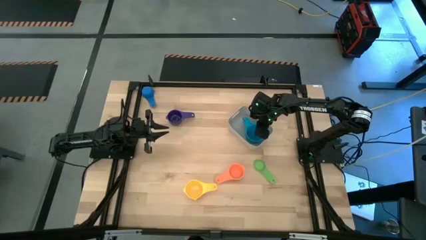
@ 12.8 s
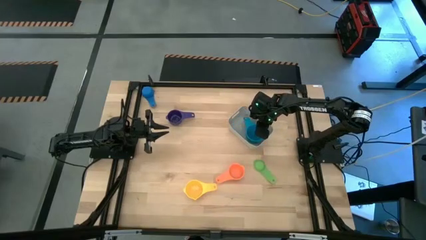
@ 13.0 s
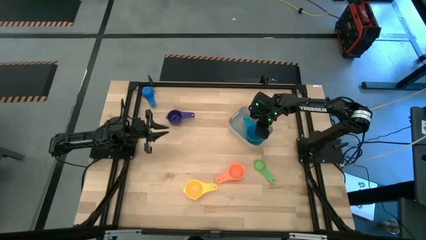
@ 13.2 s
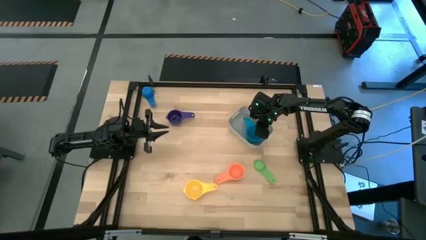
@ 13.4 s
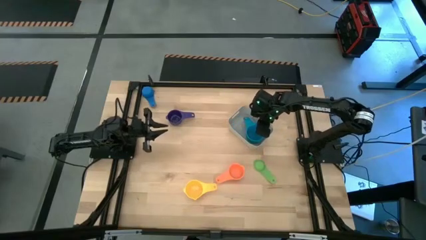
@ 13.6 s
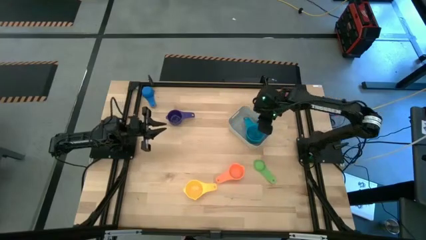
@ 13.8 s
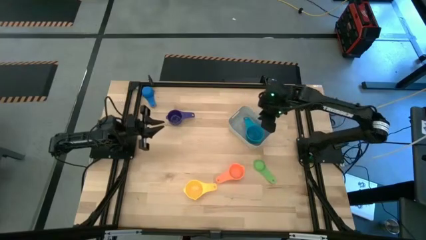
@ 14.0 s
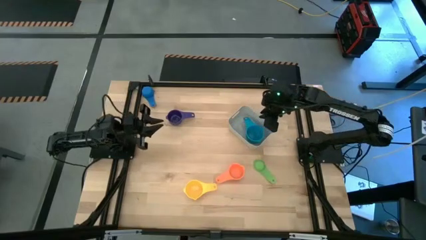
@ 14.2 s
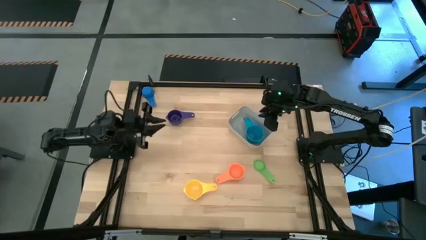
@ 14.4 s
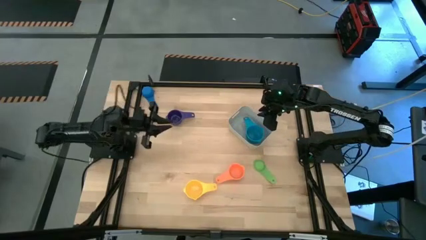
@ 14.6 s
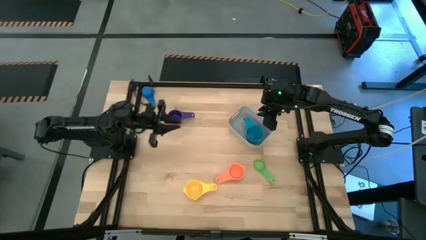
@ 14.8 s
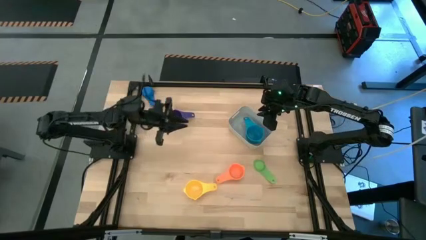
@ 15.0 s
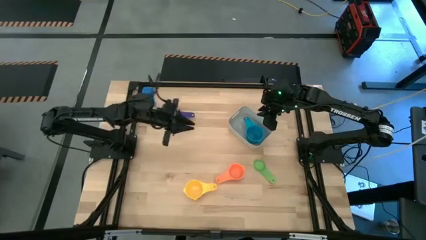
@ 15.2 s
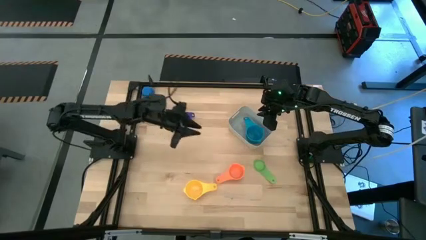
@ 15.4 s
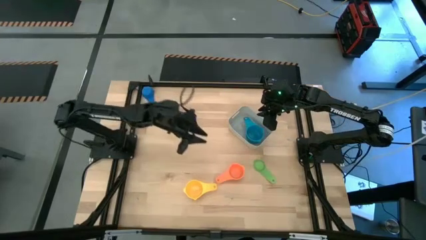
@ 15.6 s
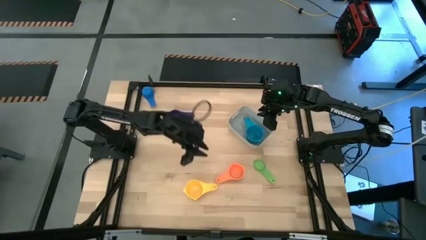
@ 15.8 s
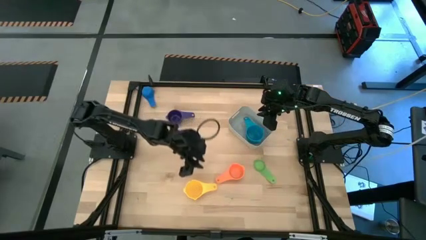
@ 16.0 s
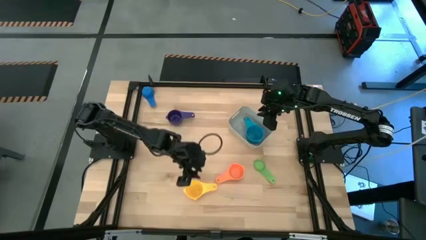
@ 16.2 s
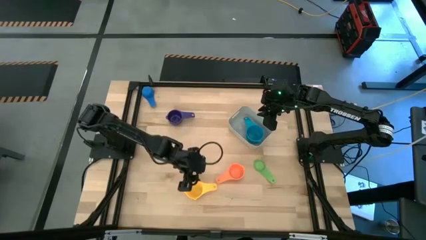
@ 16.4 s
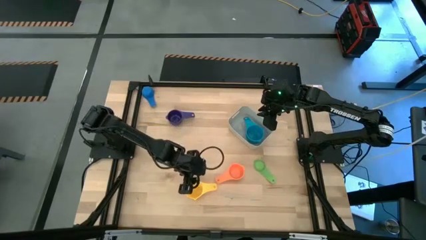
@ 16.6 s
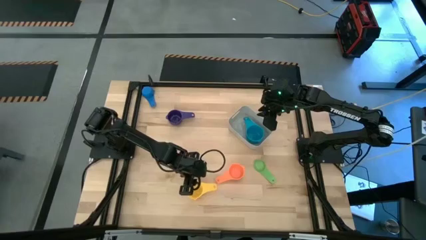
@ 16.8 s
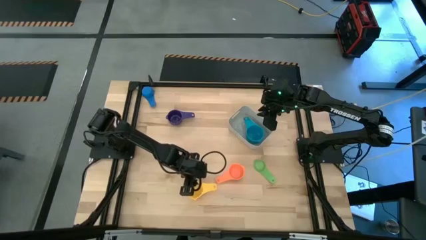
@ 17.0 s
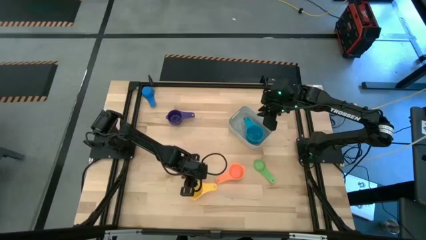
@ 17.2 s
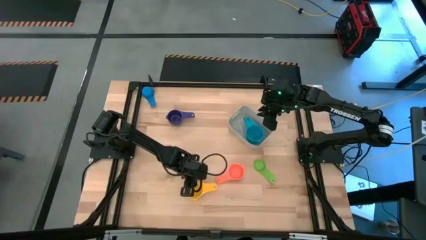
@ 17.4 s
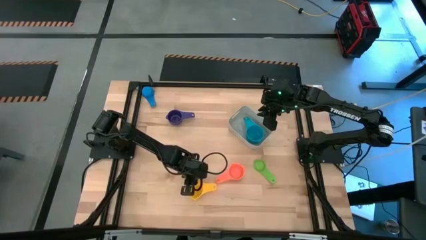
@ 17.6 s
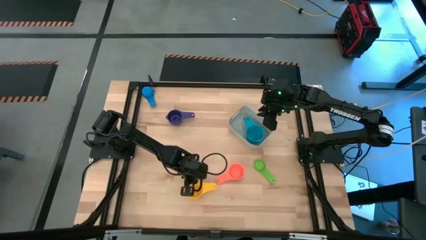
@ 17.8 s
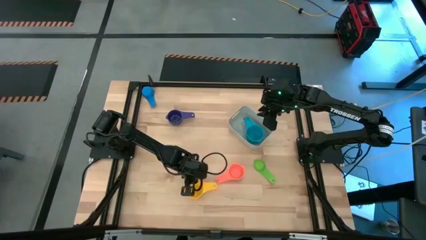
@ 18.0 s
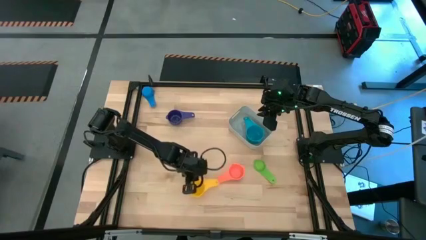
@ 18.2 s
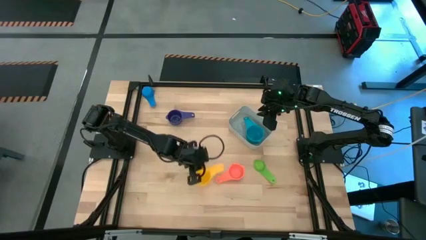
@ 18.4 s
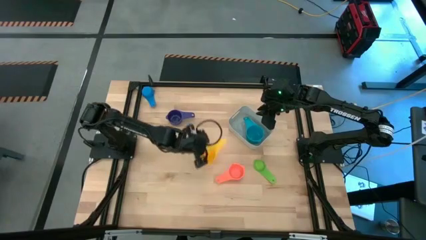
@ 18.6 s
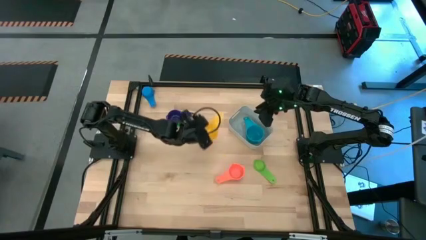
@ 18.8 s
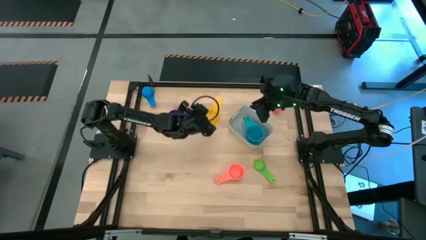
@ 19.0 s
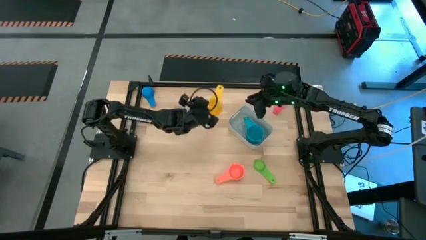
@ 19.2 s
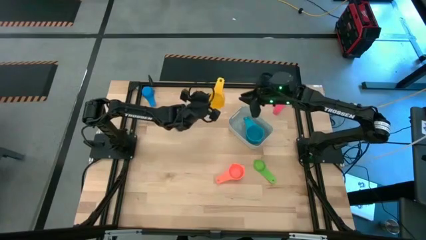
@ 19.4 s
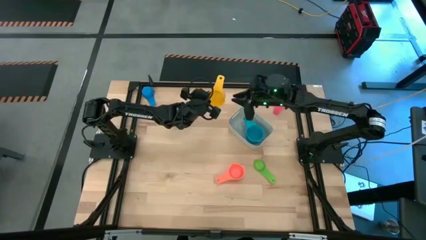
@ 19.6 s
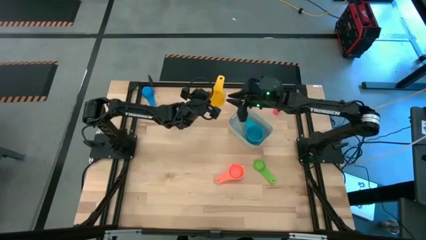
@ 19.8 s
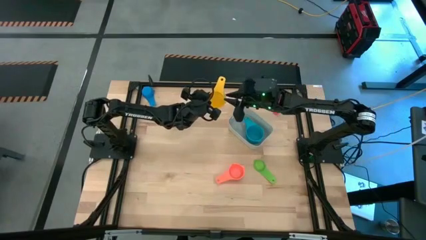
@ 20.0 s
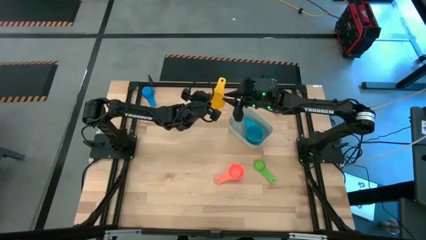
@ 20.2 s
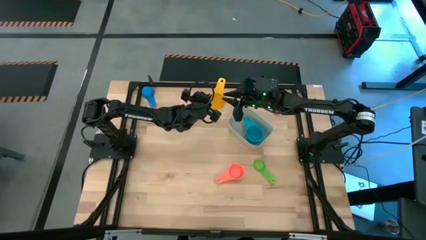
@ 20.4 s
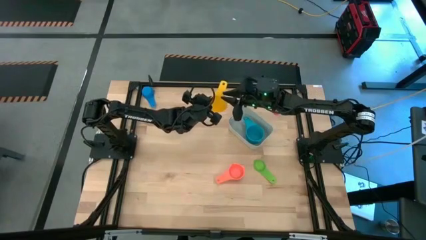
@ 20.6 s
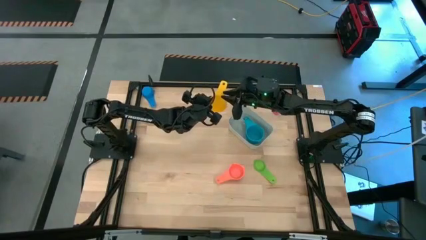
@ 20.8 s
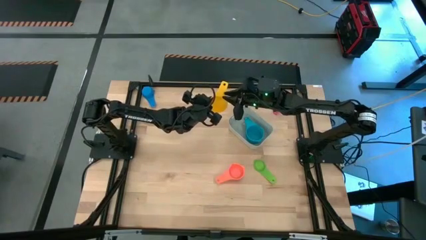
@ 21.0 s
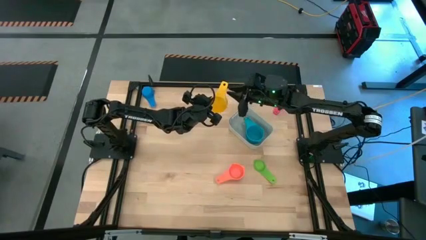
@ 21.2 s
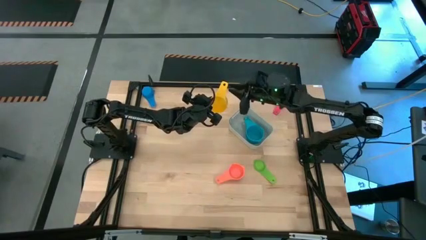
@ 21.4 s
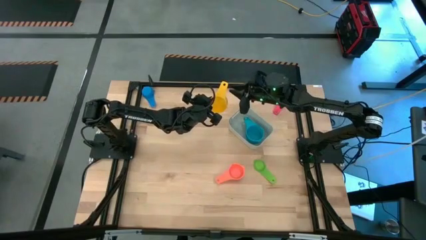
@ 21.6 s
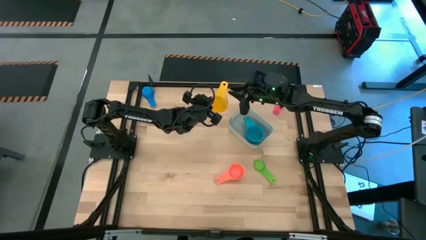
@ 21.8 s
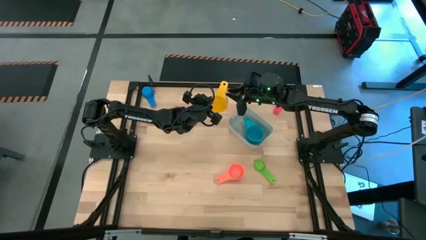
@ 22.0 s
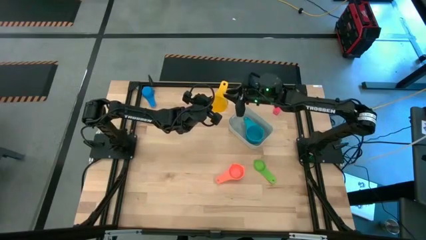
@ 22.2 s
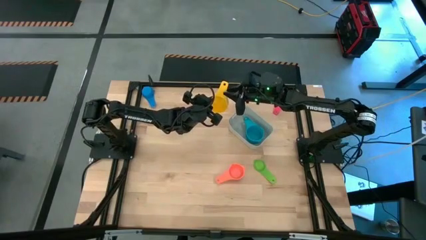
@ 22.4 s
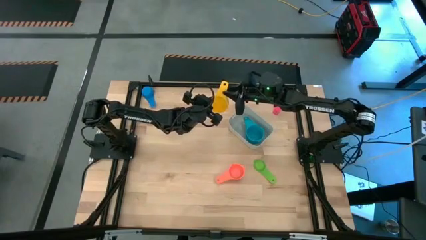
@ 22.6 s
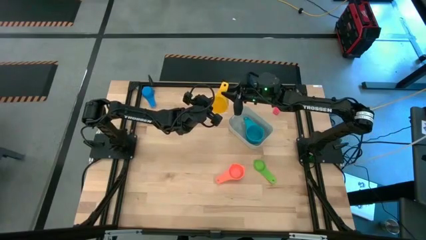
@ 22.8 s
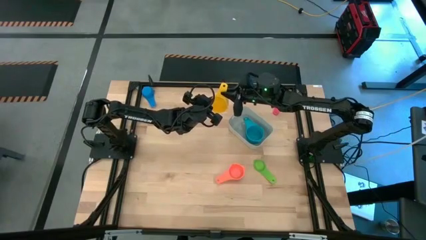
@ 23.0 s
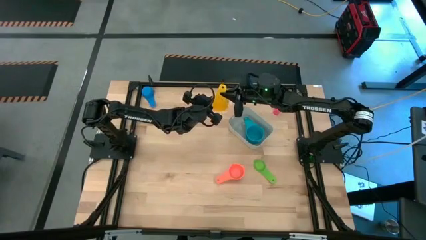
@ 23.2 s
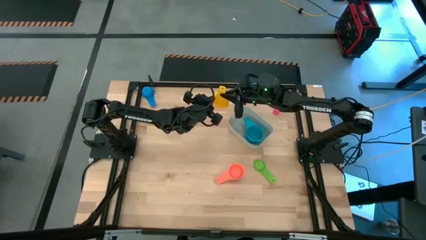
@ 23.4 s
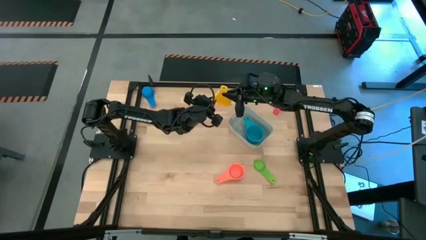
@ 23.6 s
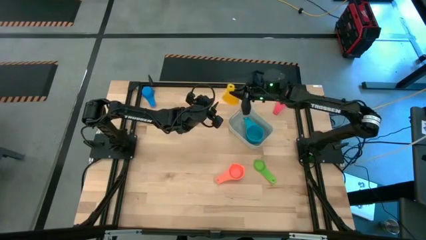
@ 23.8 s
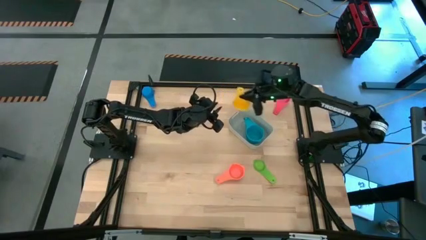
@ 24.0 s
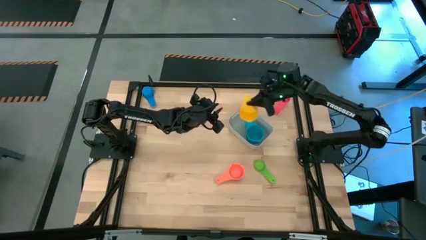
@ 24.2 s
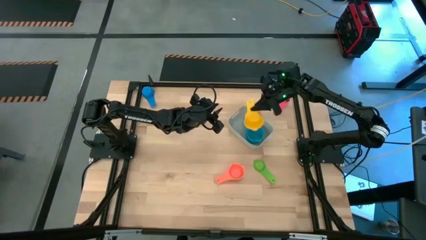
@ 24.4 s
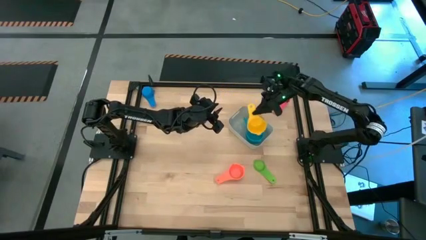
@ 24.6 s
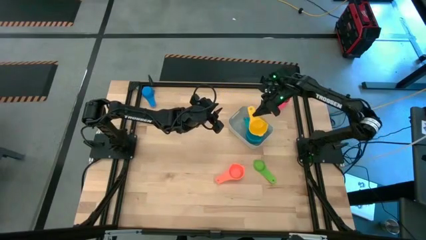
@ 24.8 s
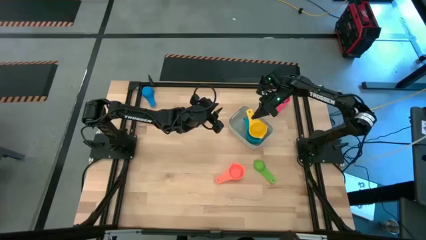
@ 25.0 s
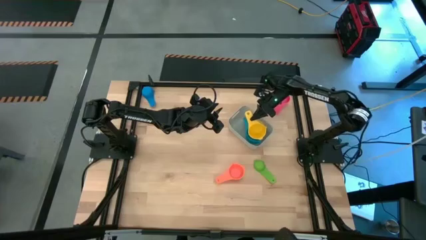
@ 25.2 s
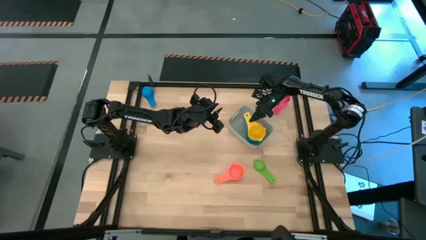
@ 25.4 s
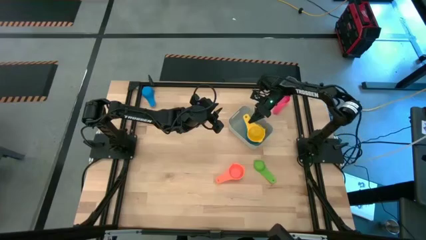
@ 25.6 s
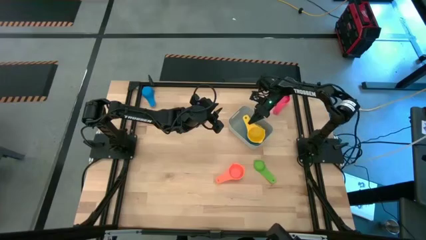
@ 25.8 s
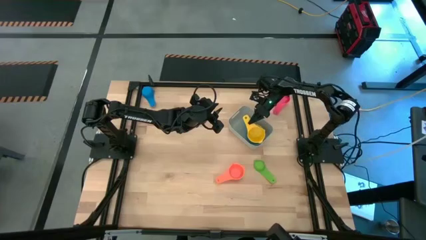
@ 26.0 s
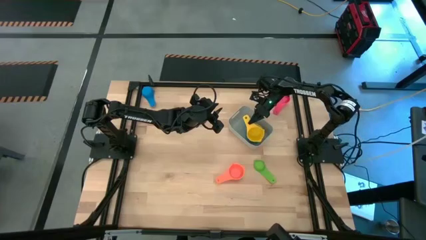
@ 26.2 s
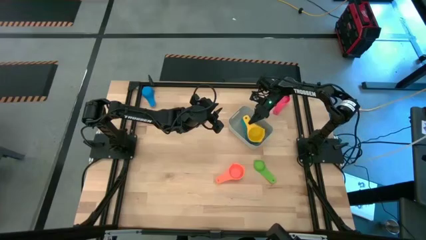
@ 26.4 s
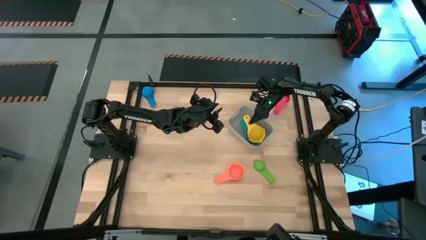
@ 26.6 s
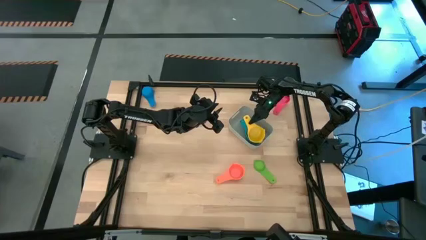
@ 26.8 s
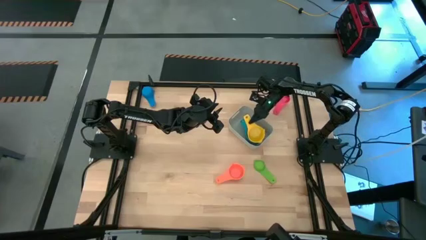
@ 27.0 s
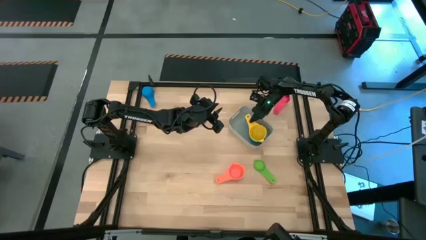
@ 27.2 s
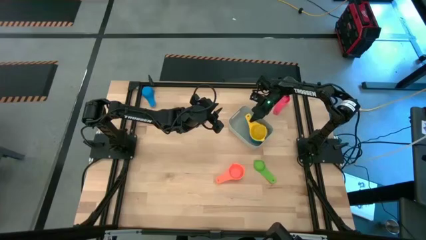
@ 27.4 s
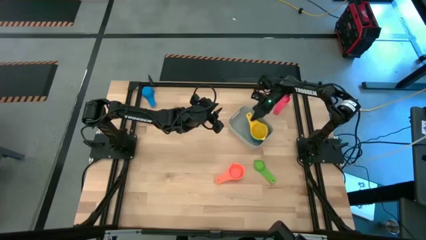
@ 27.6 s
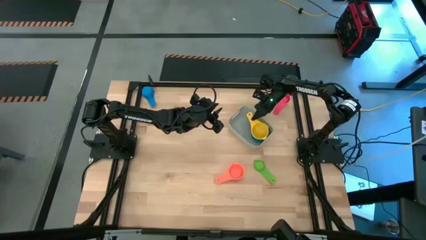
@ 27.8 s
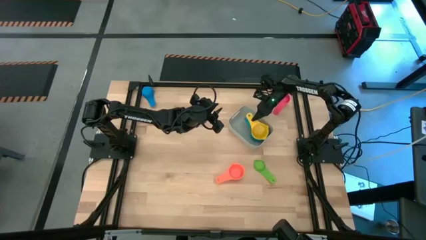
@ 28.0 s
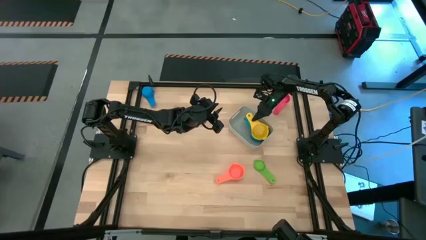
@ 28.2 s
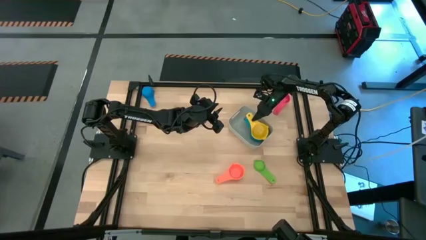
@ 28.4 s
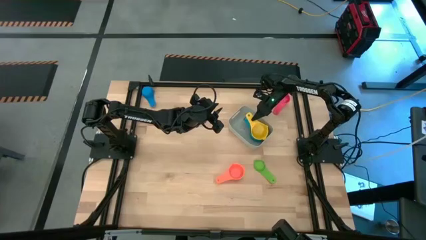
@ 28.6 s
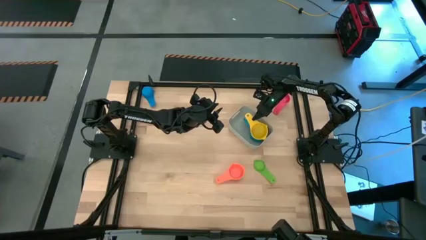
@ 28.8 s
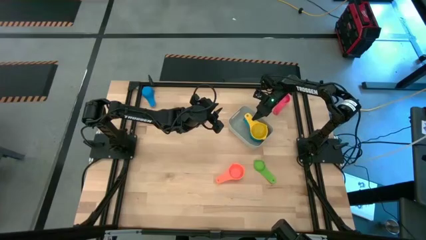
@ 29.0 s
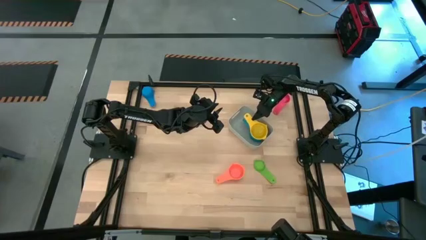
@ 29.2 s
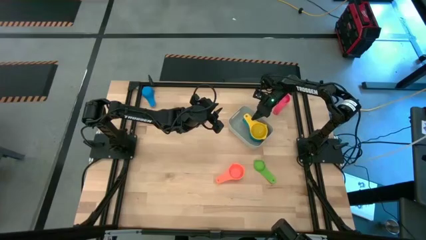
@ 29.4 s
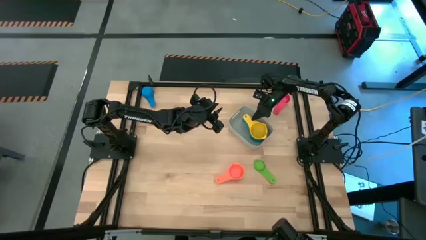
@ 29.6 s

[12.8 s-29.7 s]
Task: Nest measuring cups in basket
Stack the yellow measuring cup on top of the light blue measuring cup in the bin

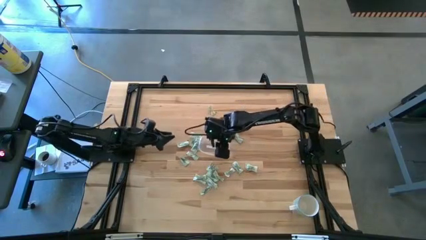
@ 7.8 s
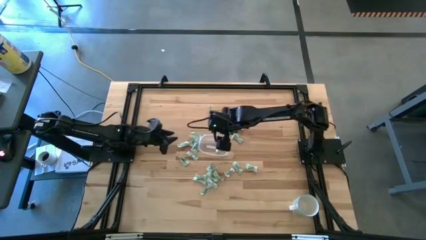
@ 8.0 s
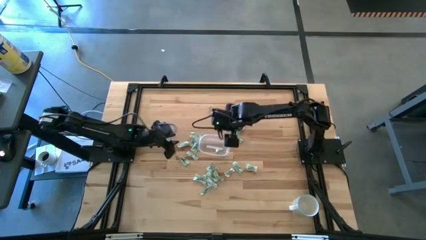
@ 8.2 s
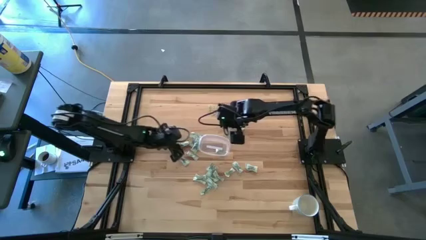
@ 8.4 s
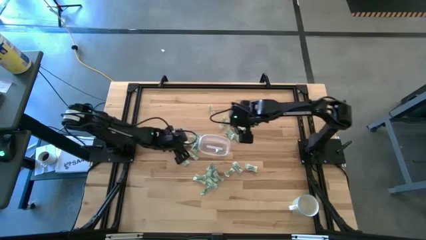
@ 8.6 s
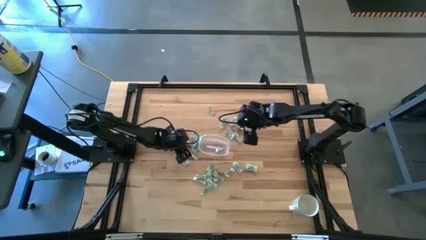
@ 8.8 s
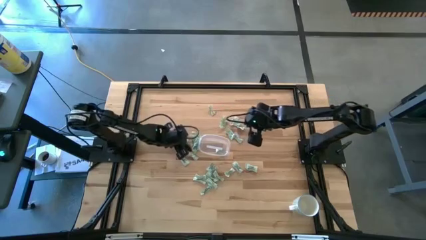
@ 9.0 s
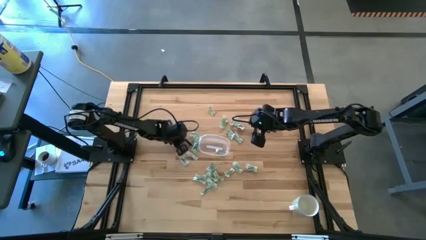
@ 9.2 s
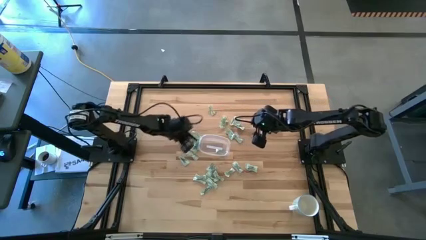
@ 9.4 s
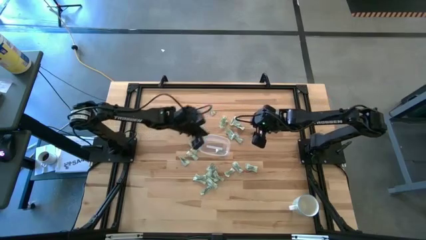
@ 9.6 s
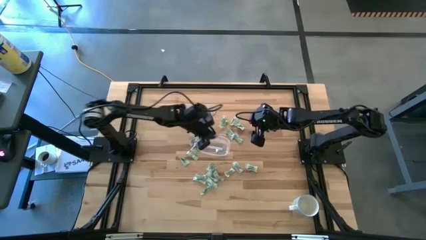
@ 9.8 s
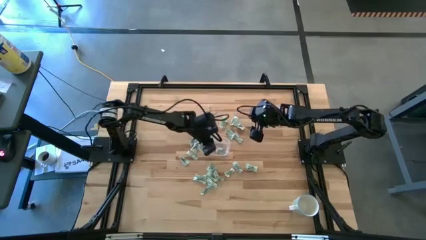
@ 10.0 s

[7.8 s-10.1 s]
Task: Pick and place Stevia / Truvia into bins
Put the stevia packet into the transparent container
